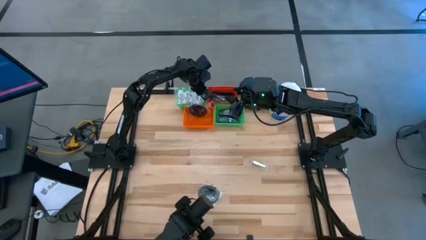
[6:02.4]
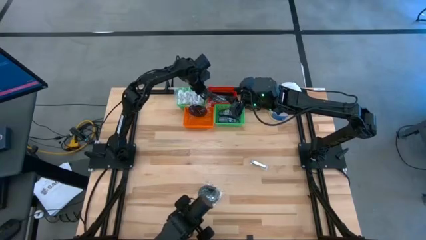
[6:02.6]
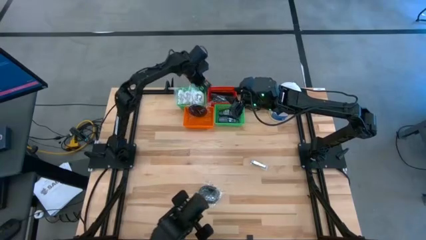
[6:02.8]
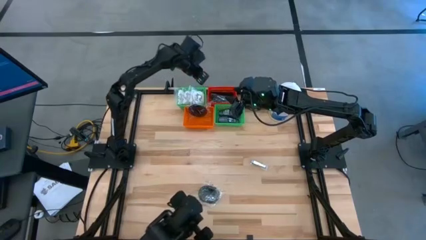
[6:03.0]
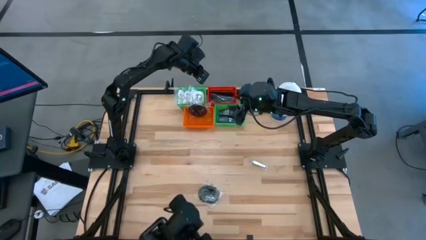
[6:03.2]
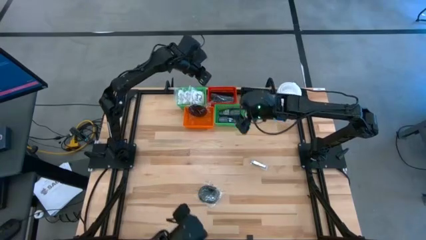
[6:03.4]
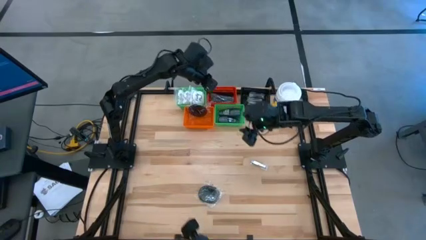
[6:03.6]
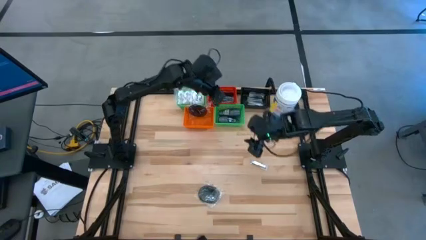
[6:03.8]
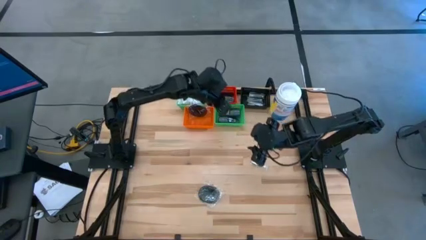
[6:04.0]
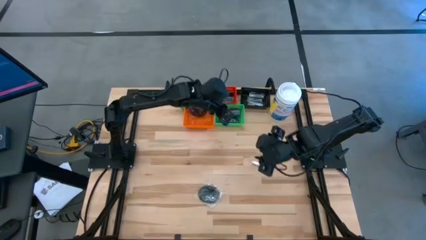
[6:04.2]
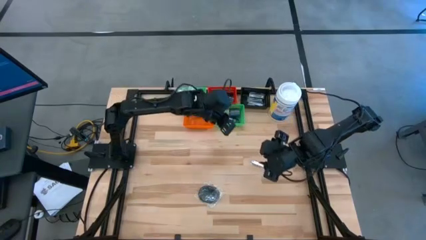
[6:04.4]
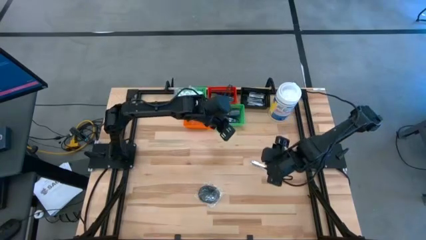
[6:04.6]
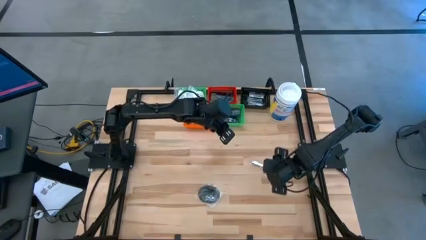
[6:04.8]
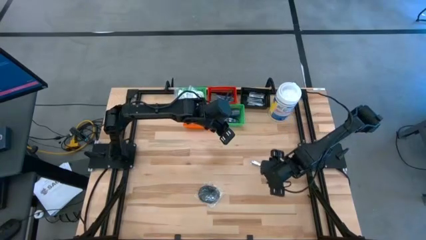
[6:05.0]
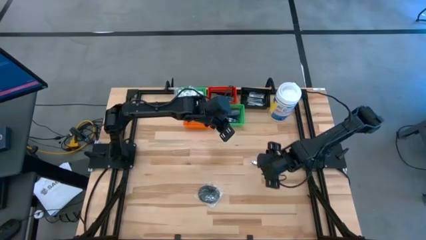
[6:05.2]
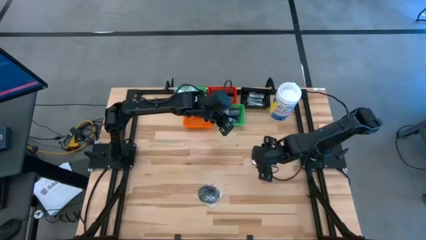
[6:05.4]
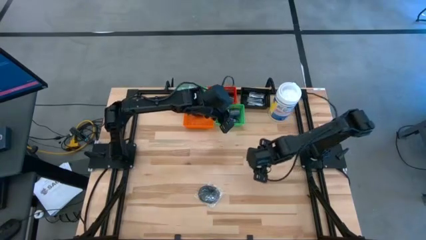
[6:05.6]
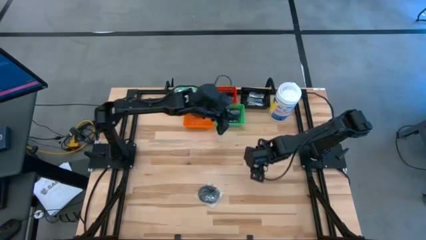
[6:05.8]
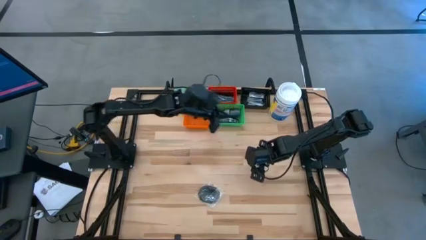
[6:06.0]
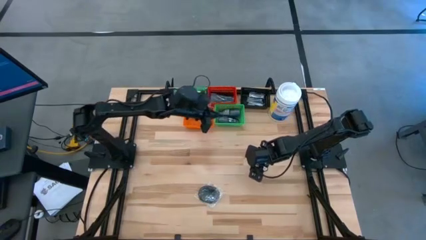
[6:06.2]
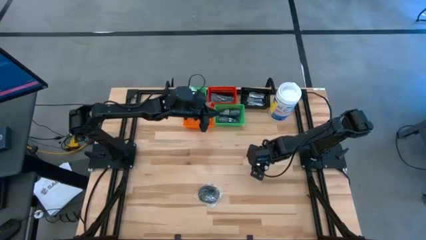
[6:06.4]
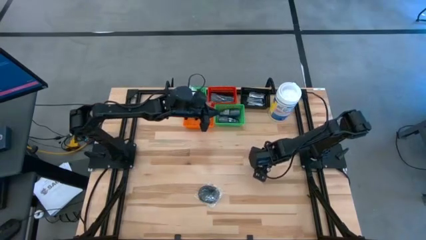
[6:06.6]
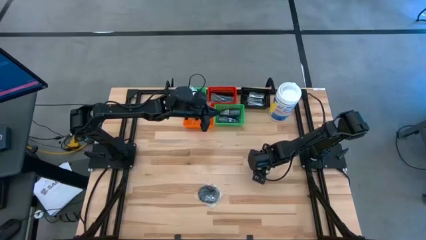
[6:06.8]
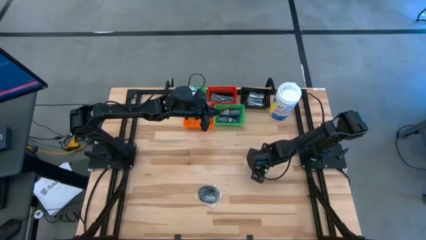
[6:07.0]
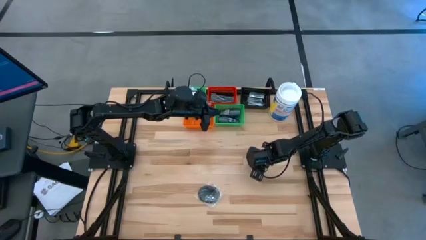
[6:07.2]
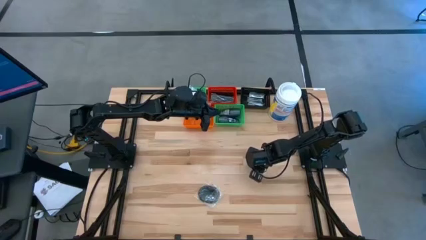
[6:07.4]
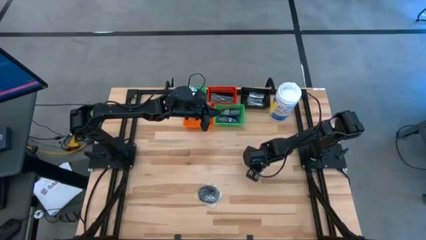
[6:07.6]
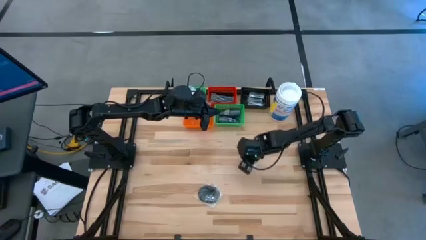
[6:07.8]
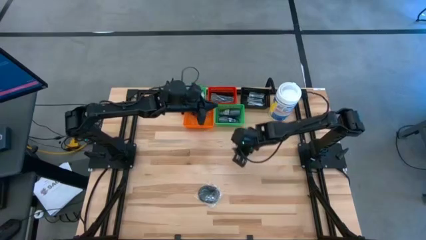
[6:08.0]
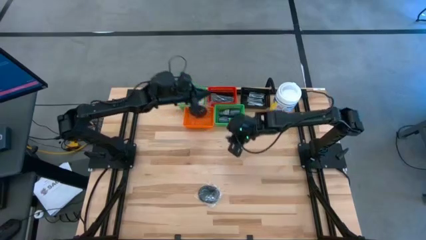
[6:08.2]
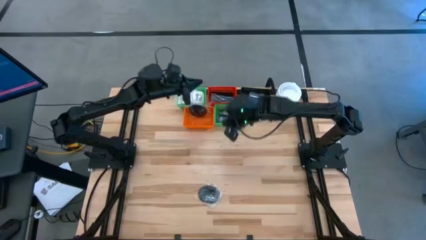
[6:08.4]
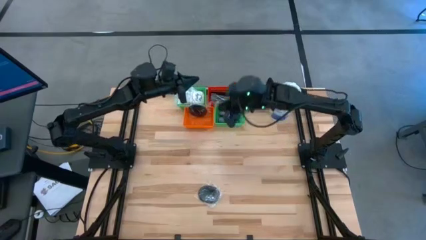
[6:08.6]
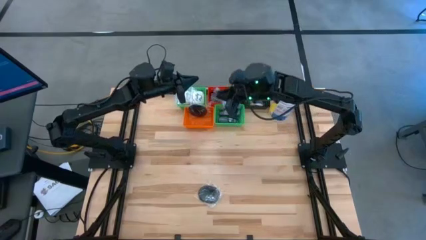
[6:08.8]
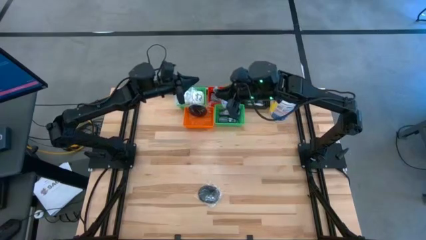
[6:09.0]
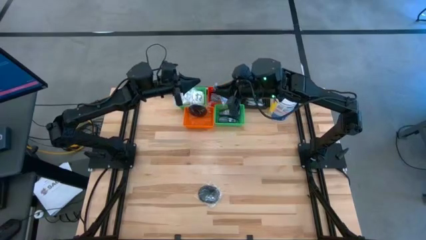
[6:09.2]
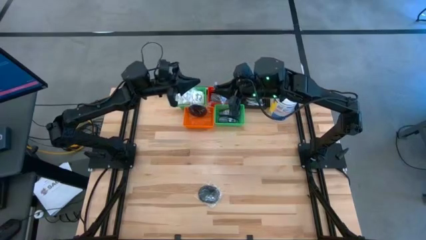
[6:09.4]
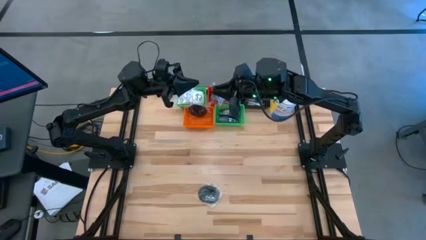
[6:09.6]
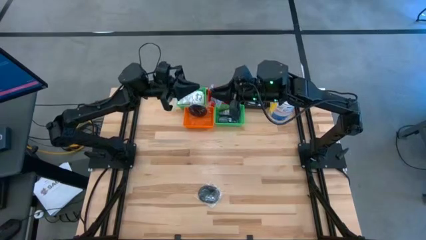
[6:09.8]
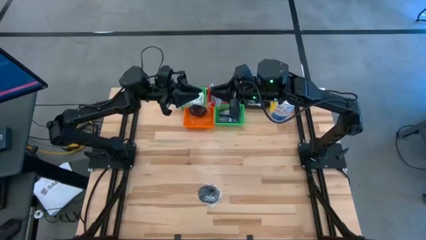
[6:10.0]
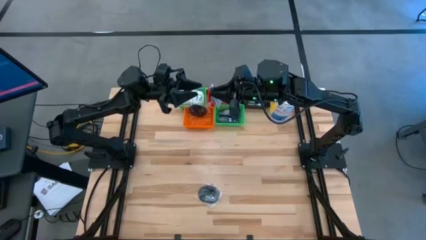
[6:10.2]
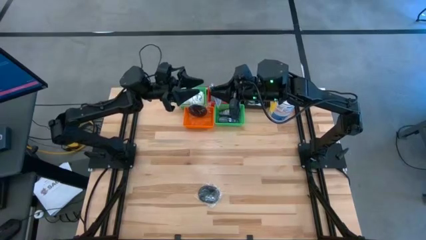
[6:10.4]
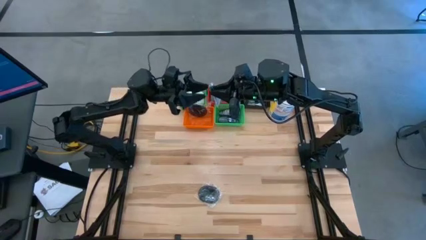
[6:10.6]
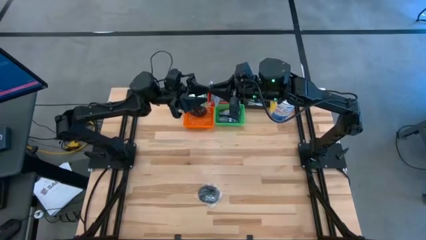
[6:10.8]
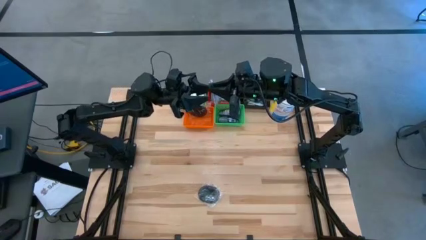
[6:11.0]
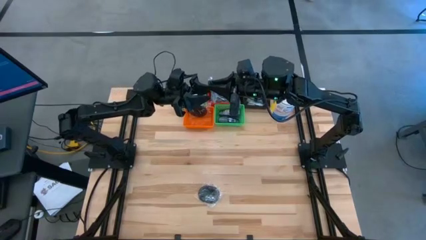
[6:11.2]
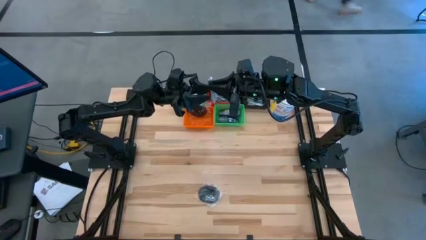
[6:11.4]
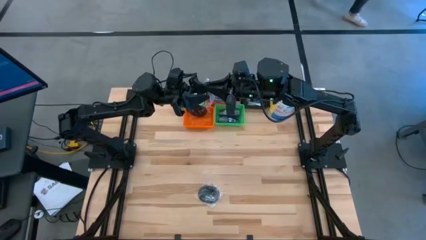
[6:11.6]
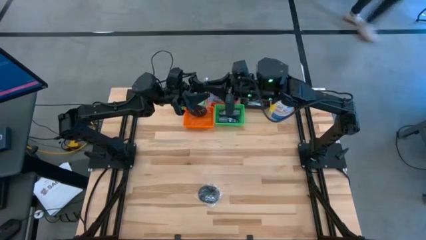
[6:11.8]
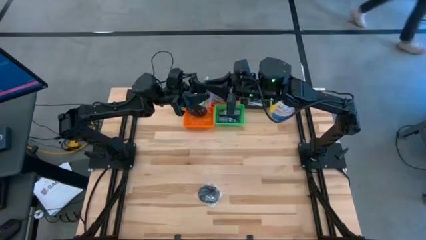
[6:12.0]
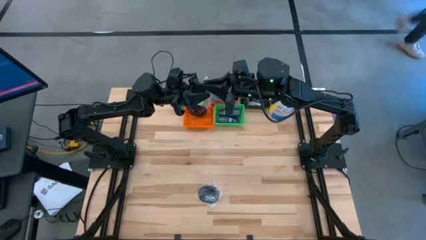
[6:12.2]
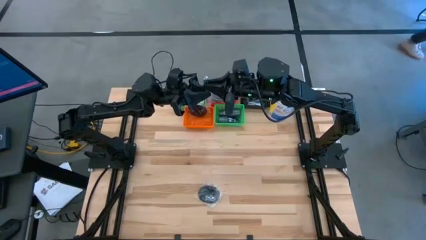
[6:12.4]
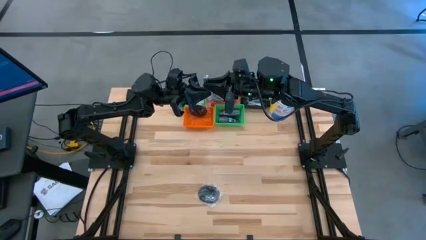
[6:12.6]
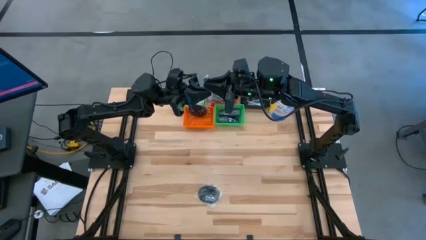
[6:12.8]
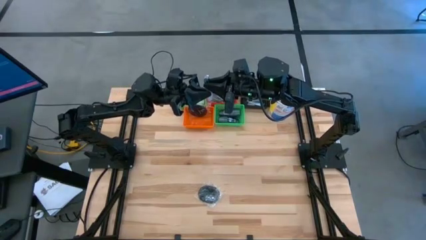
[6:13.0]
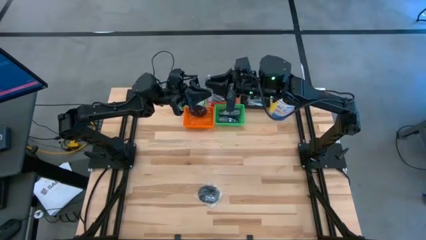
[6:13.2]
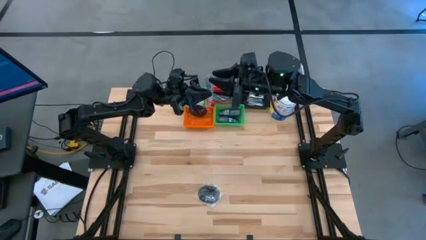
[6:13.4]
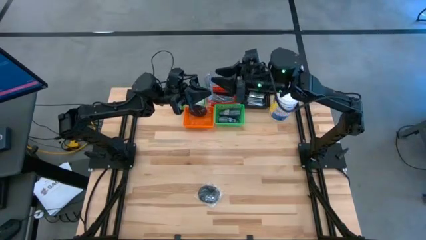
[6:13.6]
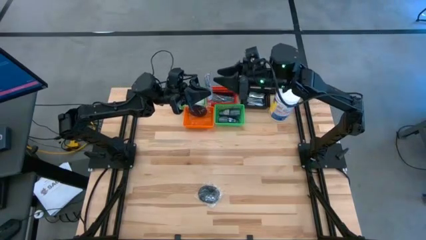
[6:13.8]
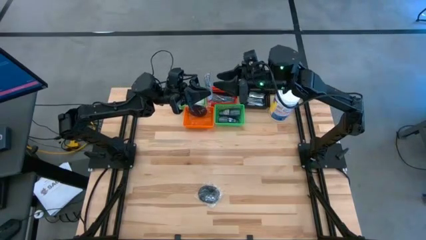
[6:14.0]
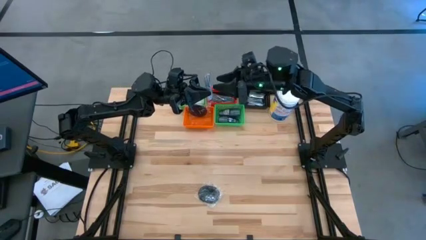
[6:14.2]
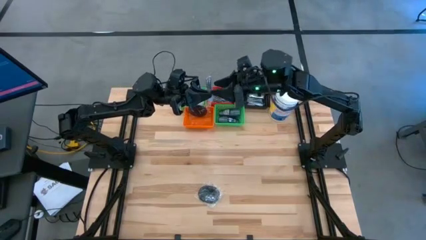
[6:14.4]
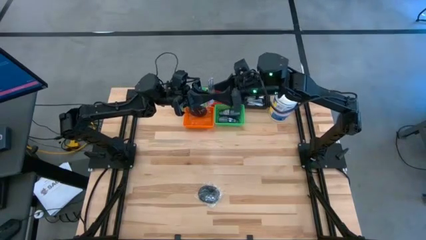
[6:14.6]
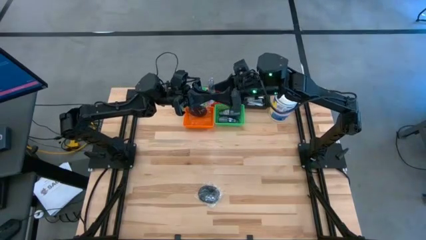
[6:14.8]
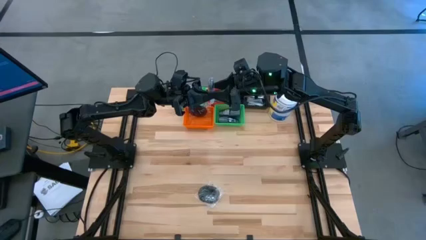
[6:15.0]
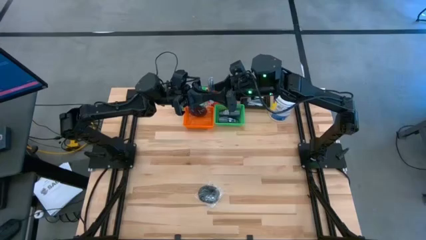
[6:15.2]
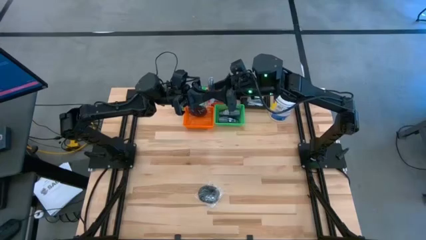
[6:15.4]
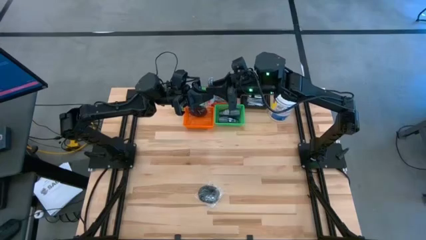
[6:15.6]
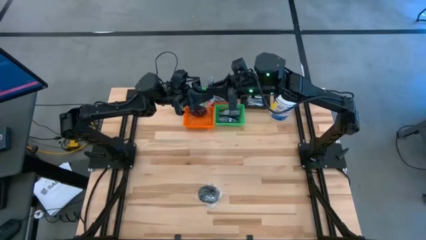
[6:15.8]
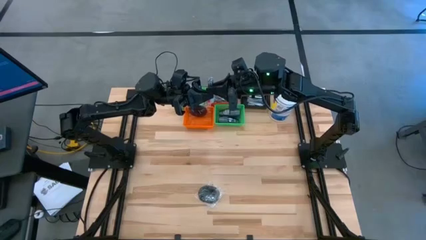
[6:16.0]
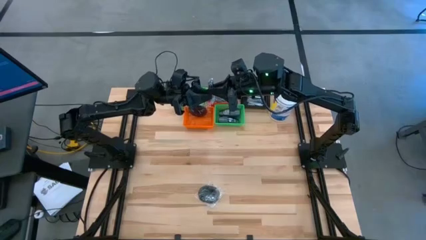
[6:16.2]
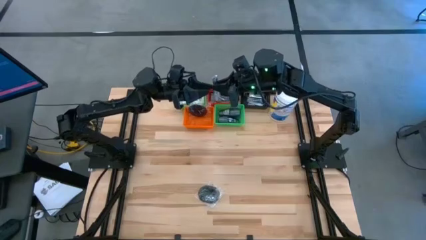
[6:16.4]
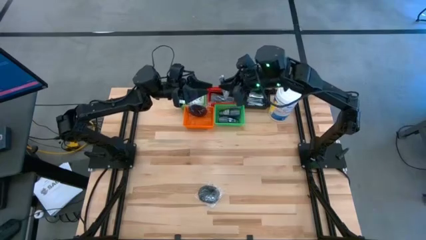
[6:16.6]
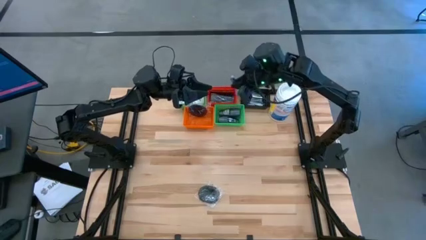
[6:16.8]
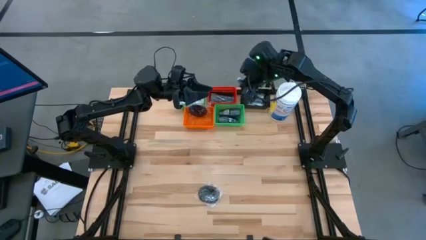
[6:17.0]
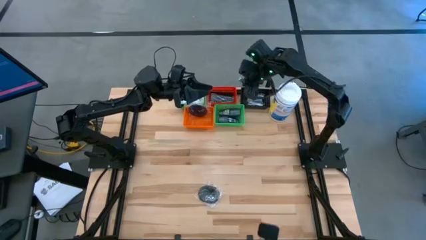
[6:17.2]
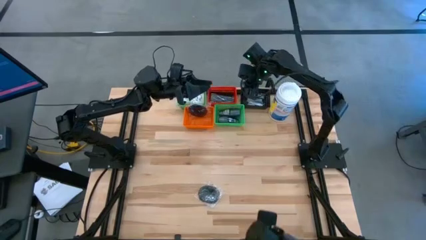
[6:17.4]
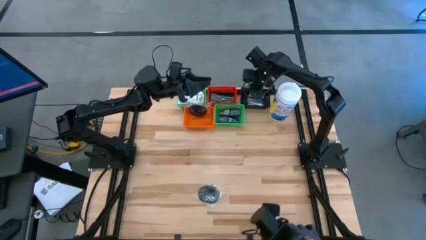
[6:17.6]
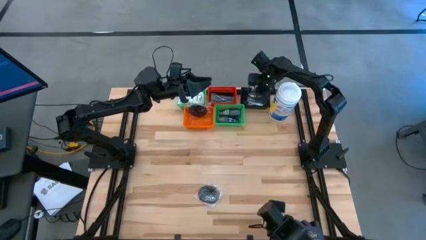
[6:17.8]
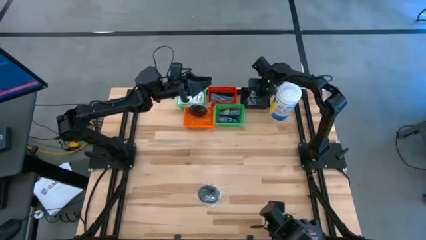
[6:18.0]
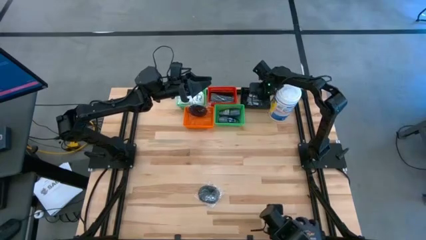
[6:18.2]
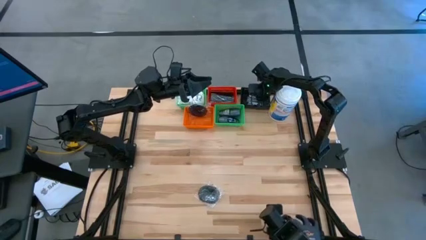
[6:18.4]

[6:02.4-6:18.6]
Task: Pick & Place Travel size toiletries
Put the nail cutter into the black bin

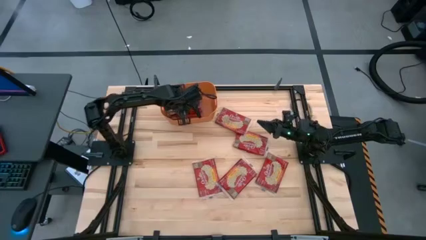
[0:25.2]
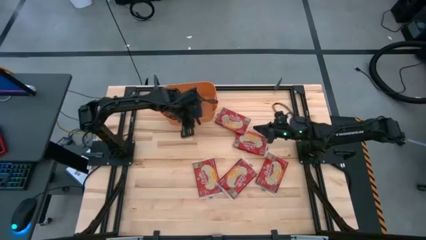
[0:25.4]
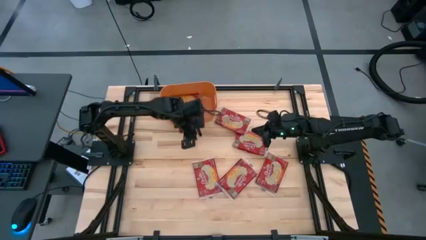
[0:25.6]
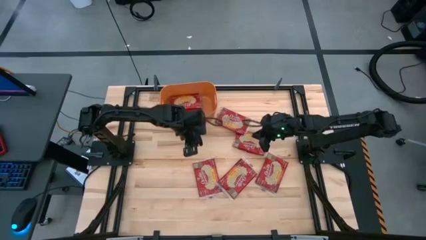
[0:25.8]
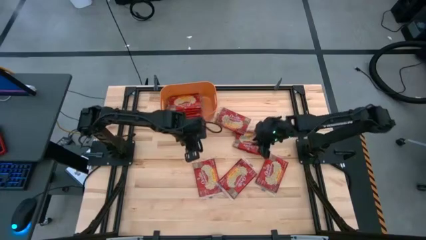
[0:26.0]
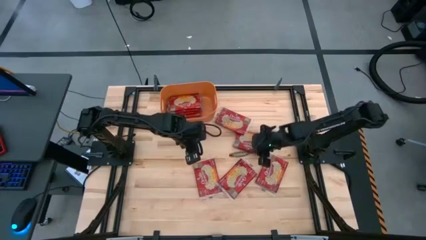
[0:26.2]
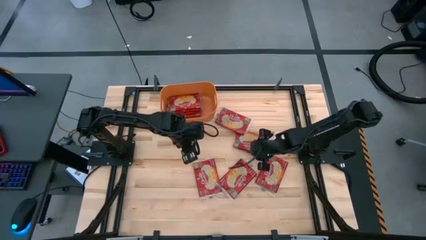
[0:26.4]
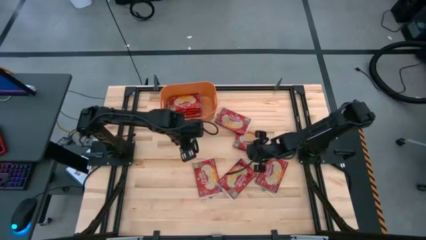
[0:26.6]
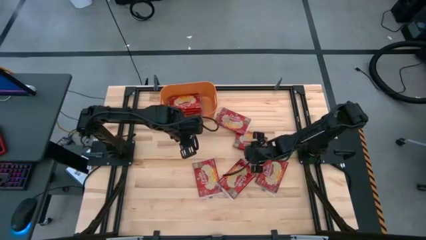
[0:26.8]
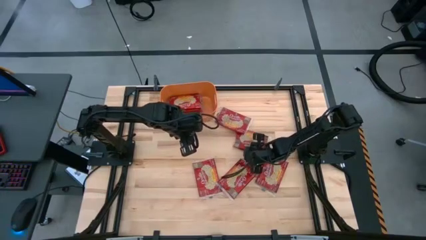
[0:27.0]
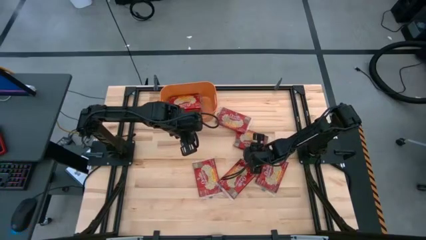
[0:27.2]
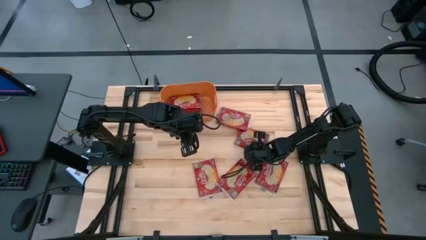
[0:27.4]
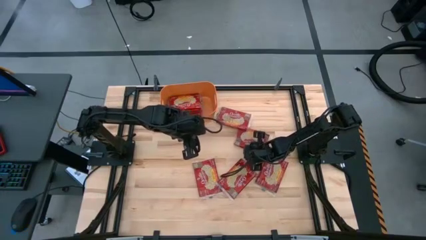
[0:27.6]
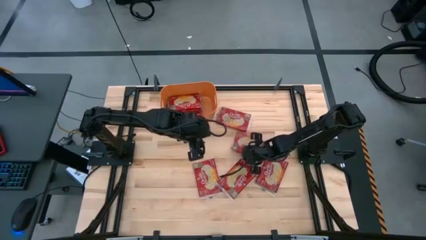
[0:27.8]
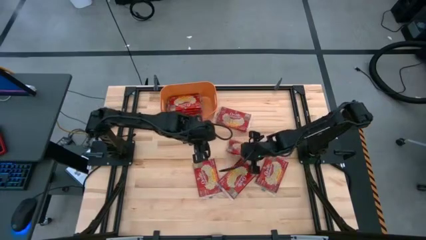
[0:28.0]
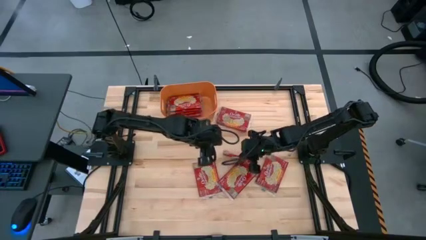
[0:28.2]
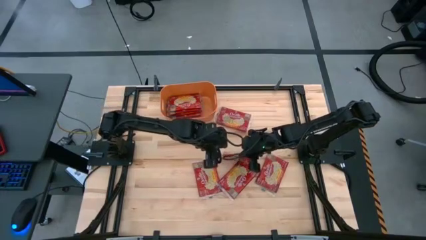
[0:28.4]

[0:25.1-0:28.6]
Task: Sort popcorn bags into baskets
Put the red popcorn bag into the orange bin
